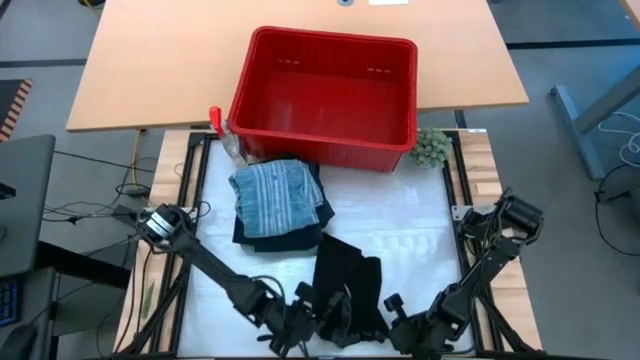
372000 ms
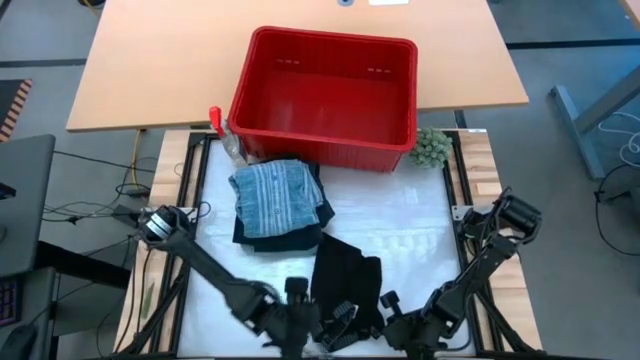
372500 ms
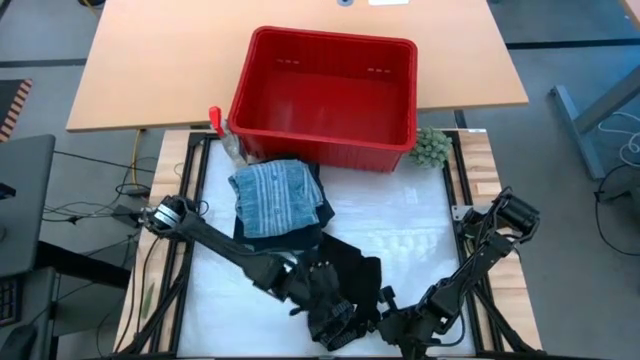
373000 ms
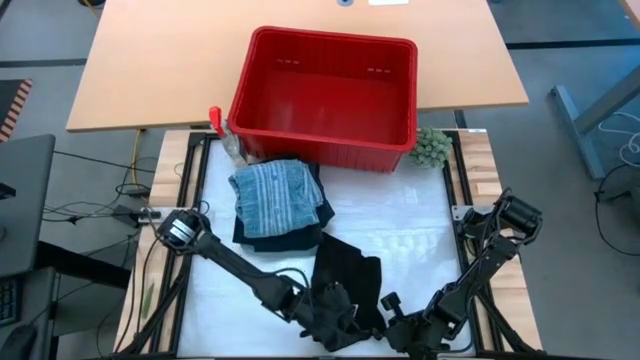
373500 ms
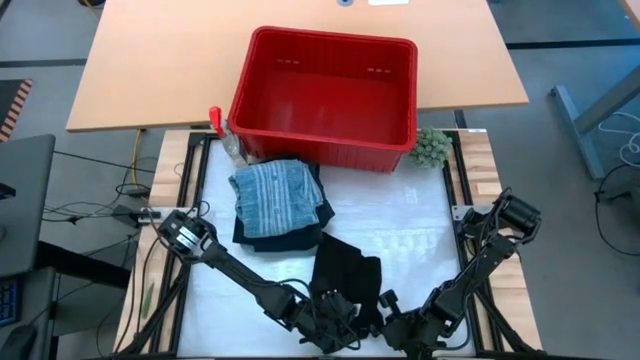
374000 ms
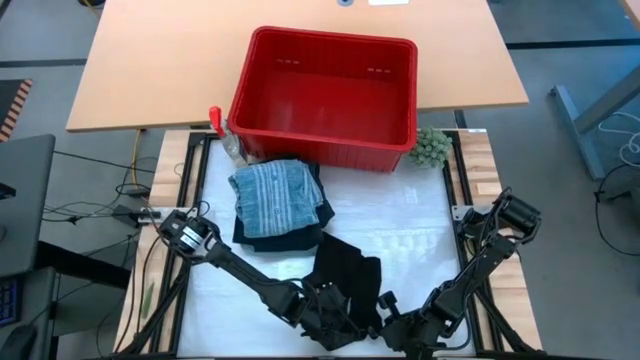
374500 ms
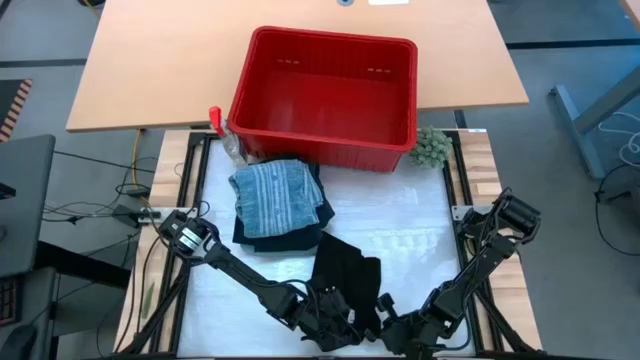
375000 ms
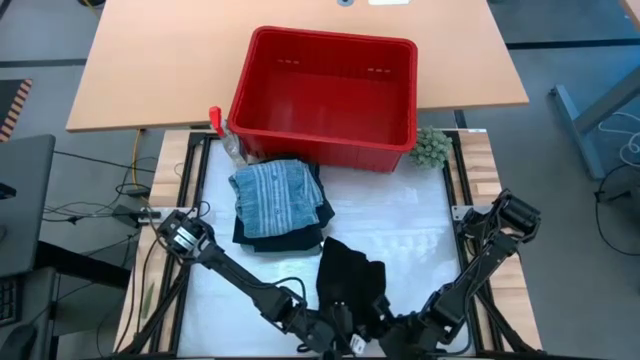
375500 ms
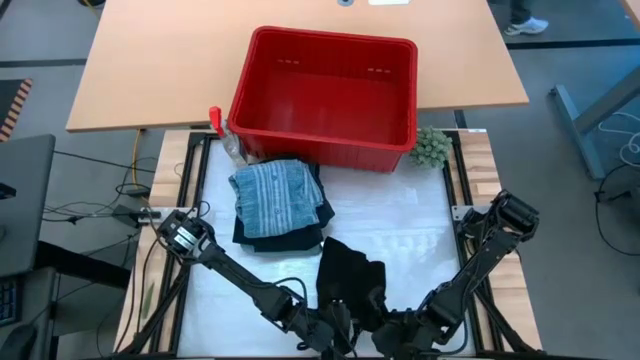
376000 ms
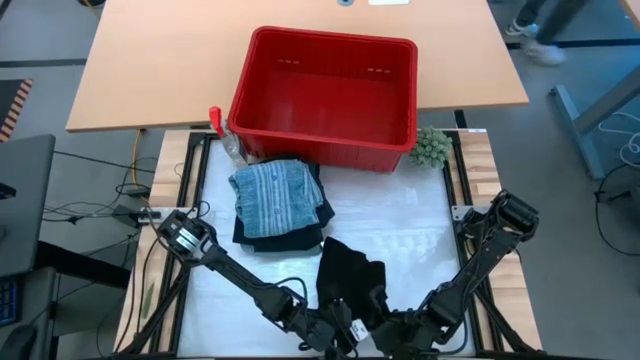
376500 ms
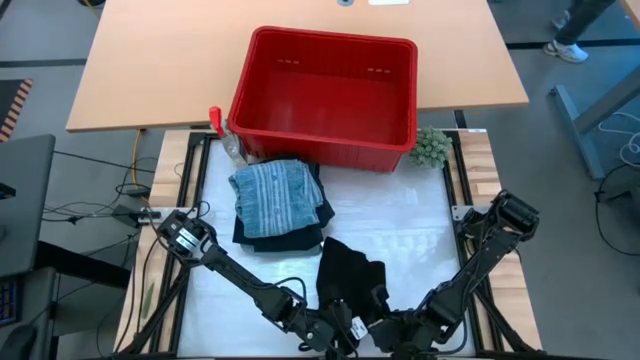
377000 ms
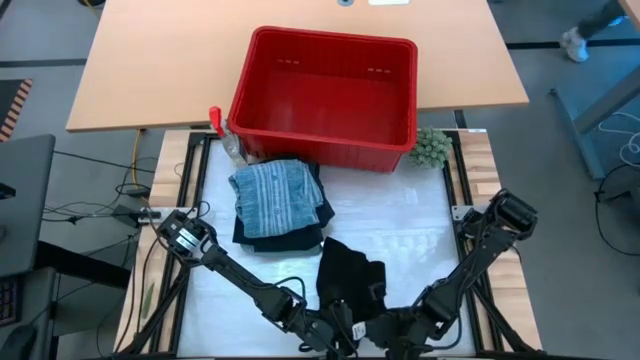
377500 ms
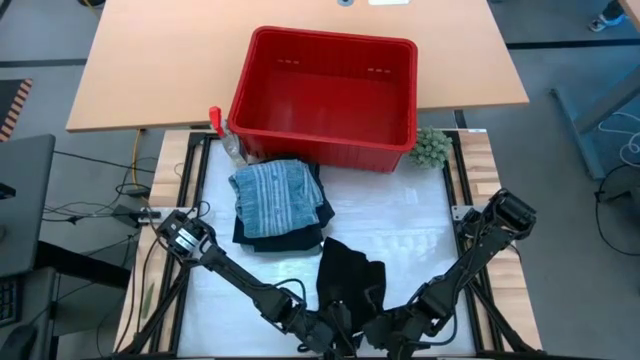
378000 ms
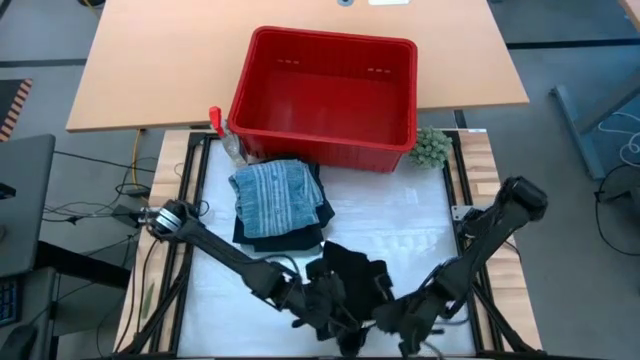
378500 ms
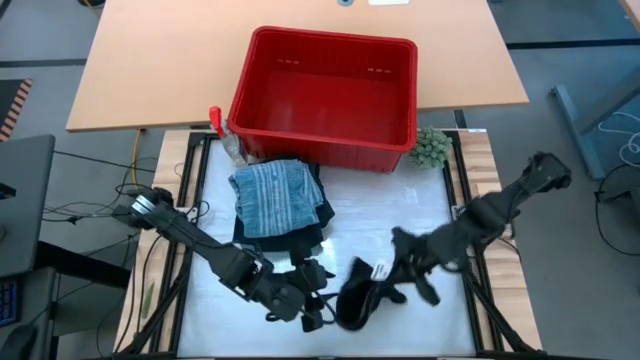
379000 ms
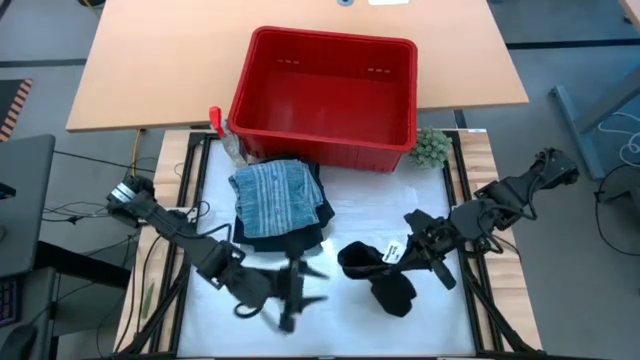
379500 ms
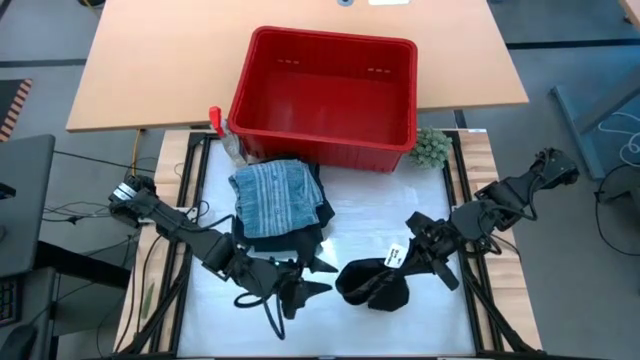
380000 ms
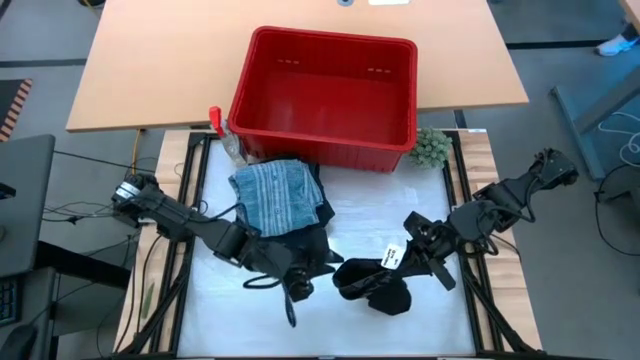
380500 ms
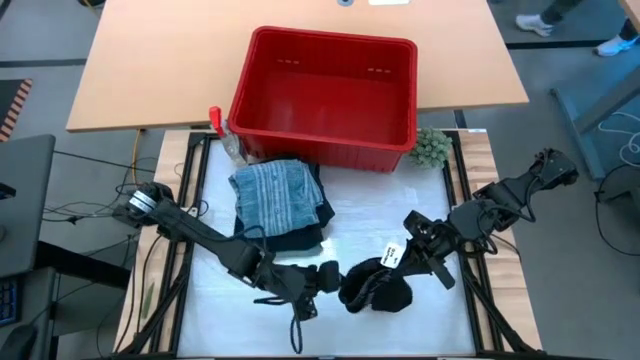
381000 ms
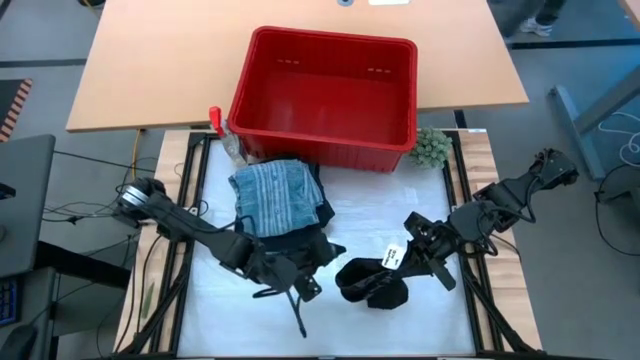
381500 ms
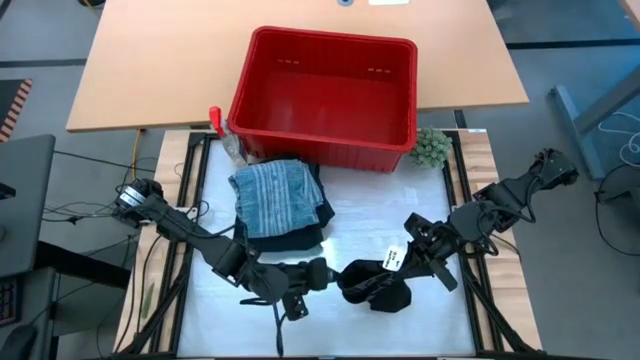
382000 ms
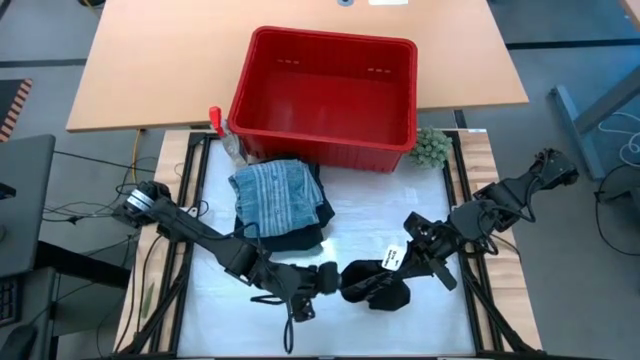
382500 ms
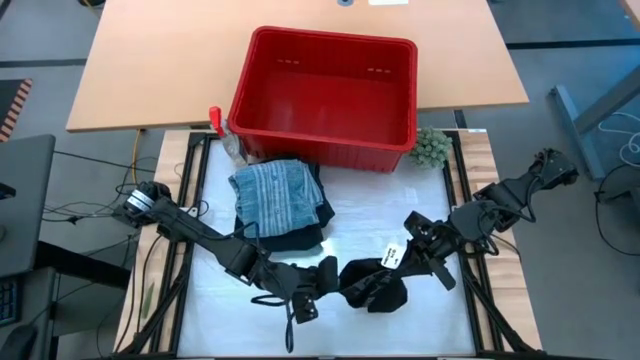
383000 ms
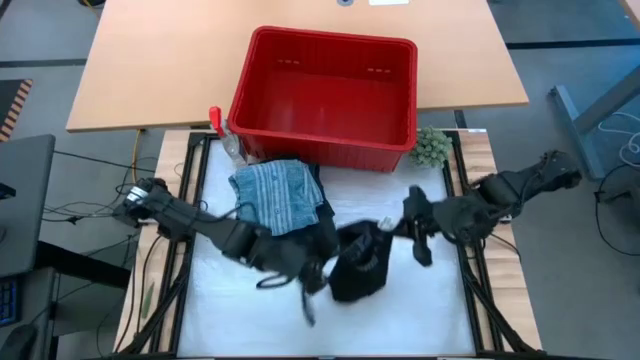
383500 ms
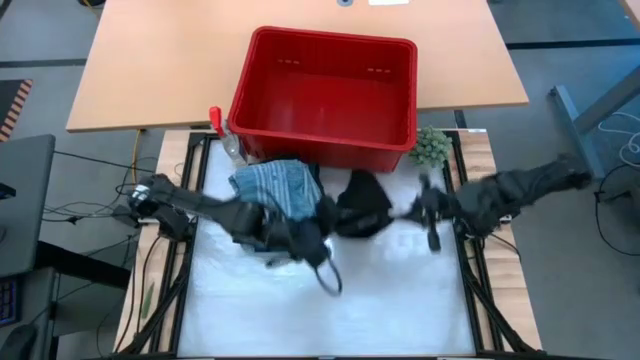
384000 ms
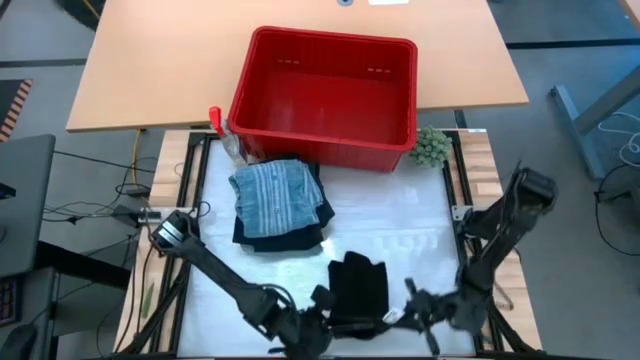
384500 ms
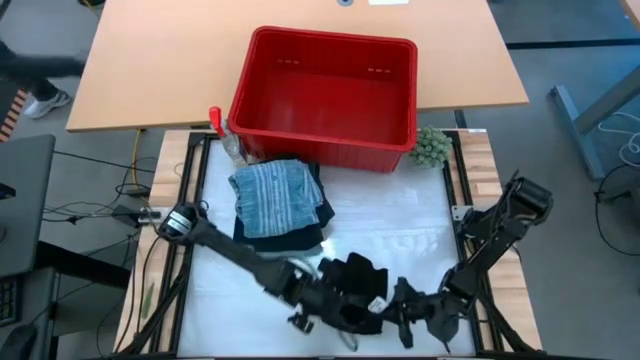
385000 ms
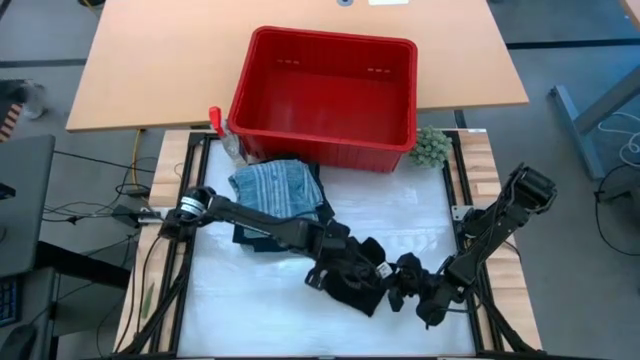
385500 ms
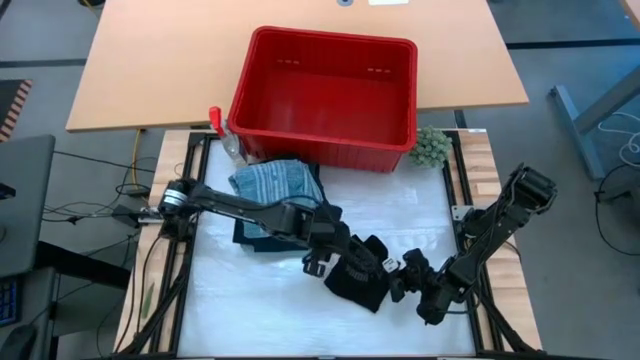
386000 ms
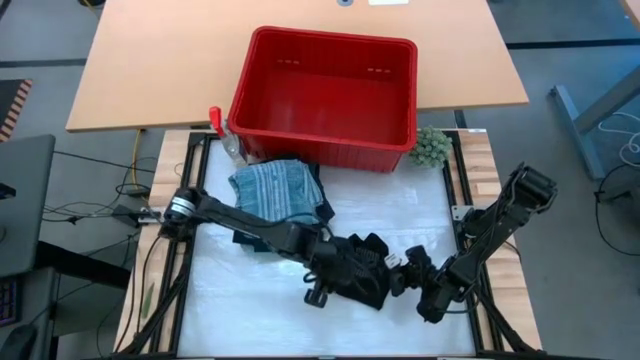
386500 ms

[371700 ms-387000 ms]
Task: Fold laundry
Fold the black boxer from the red laundry bin

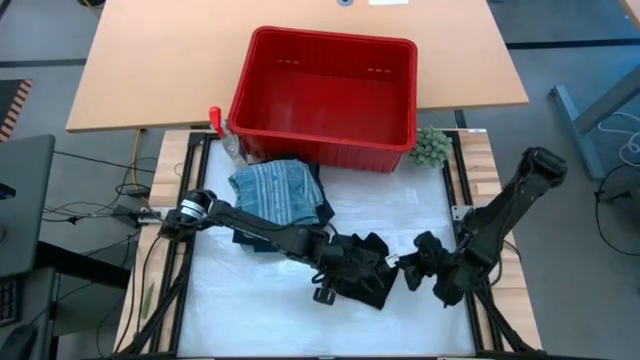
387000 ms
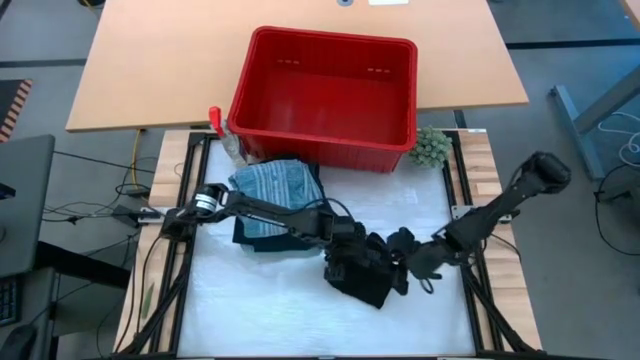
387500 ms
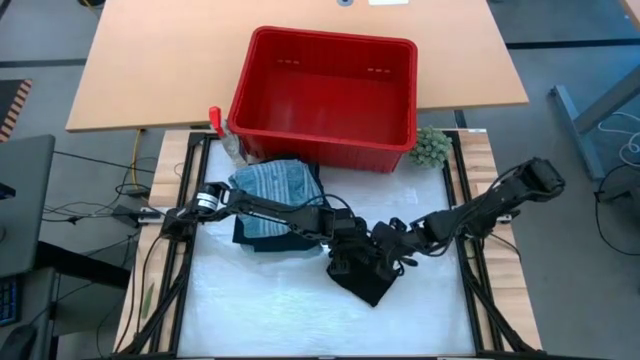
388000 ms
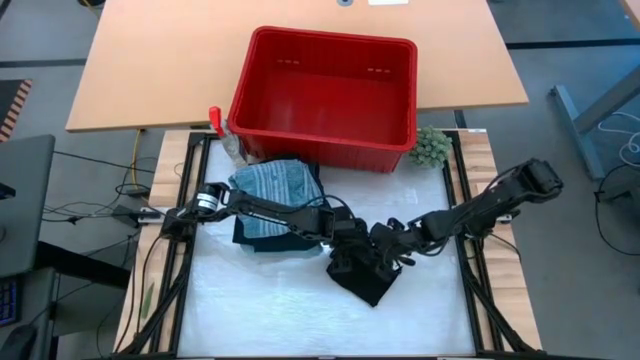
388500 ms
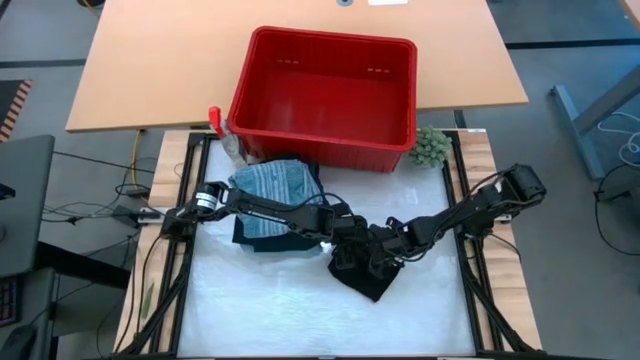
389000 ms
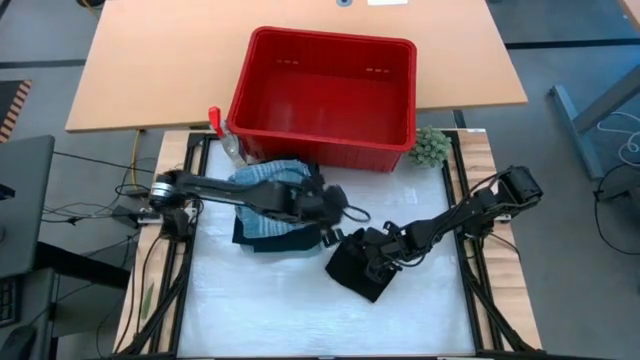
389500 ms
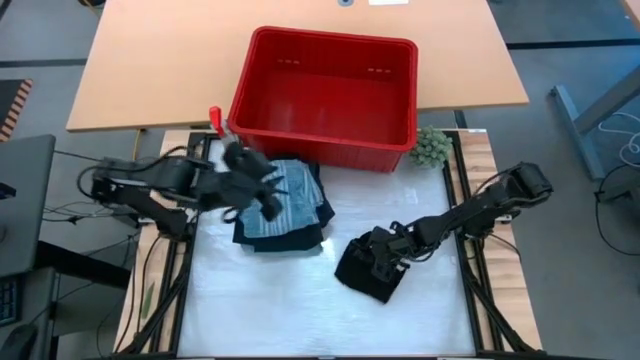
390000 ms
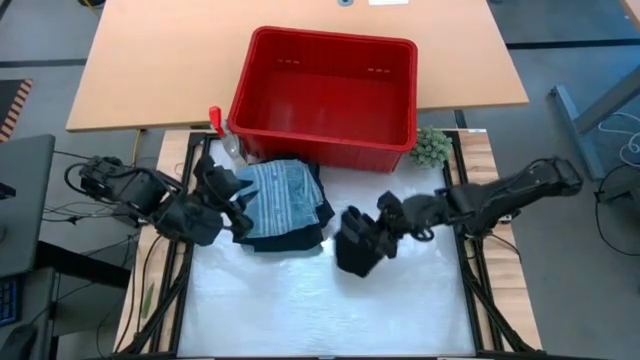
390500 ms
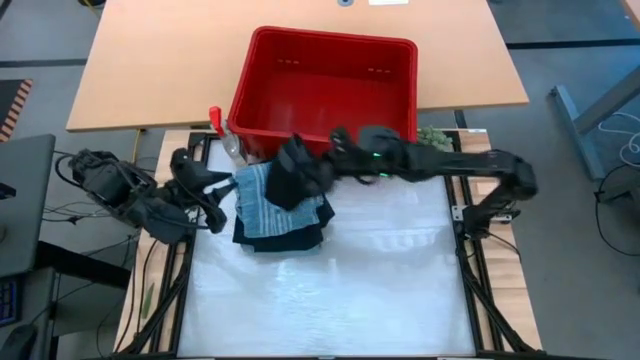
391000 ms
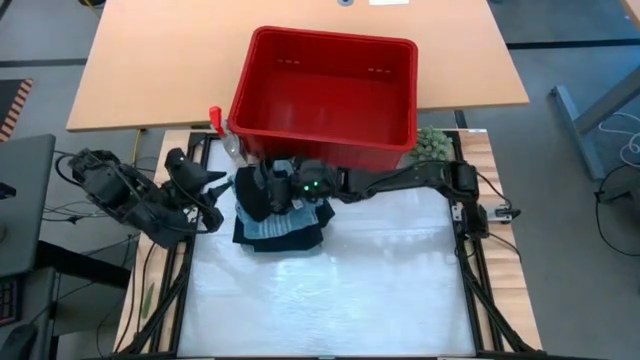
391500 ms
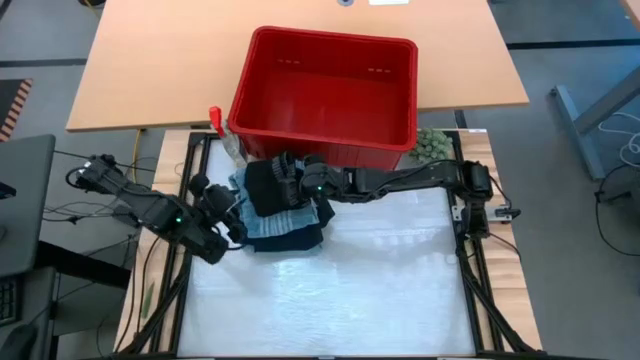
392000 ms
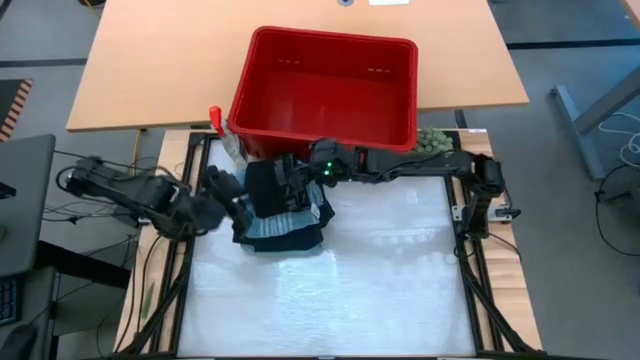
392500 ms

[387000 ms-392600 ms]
Stack the black boxer on the blue shirt

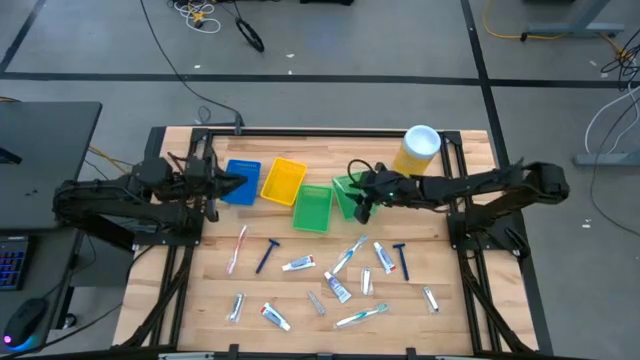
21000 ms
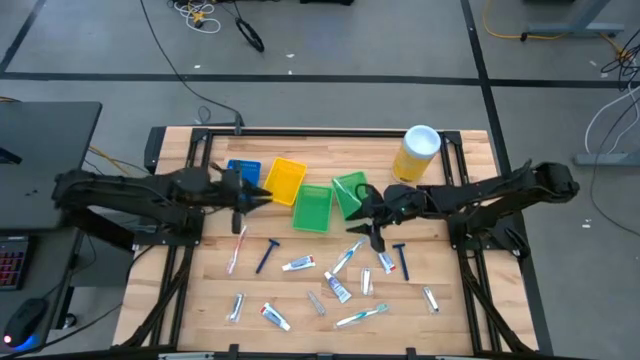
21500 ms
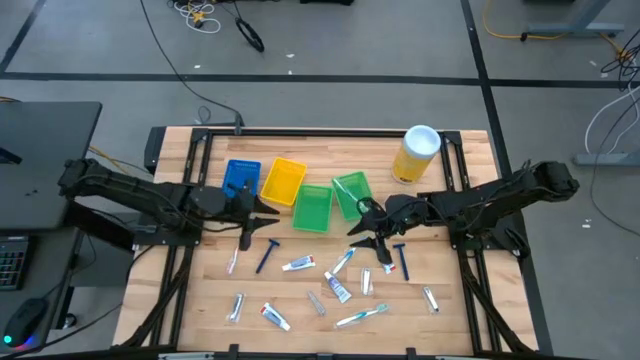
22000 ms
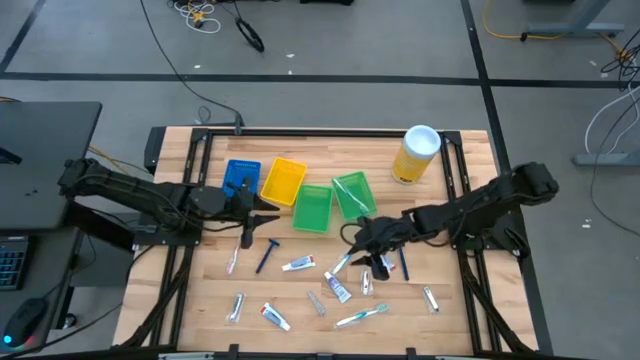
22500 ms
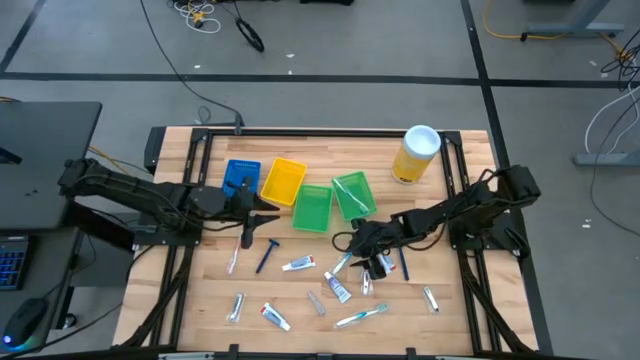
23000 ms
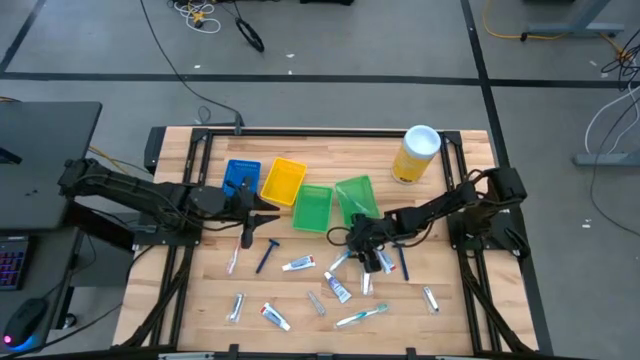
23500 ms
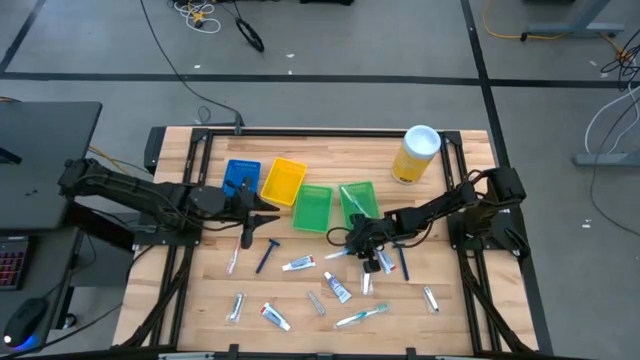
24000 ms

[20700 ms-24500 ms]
Task: Pick & Place Travel size toiletries
Put the blue toothbrush into the right green bin
